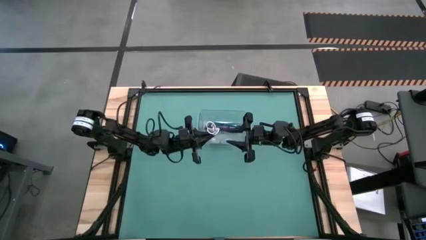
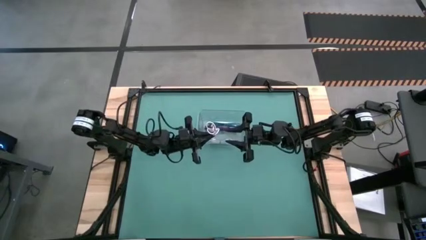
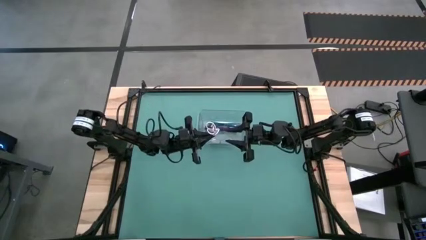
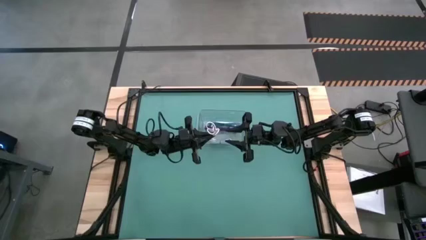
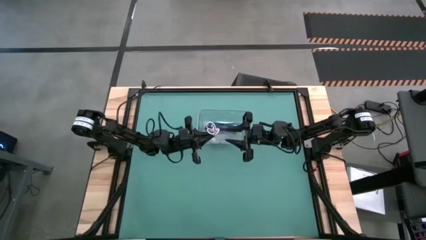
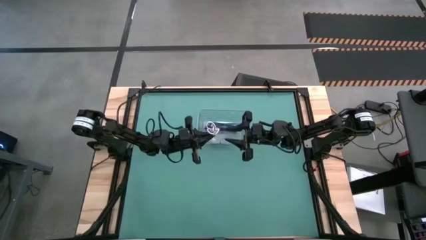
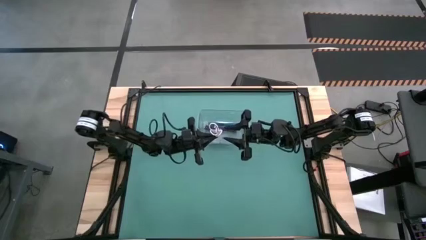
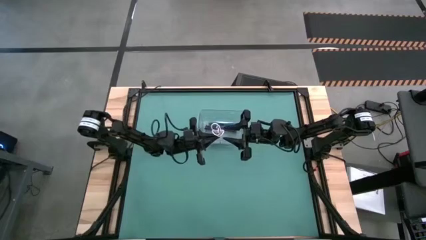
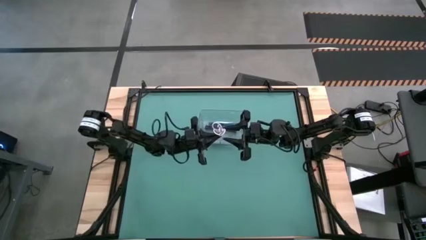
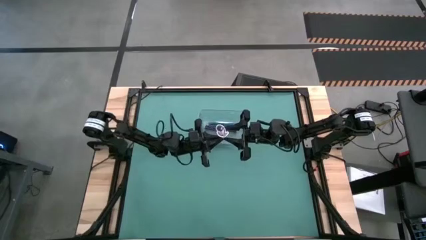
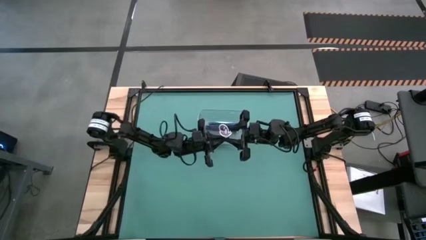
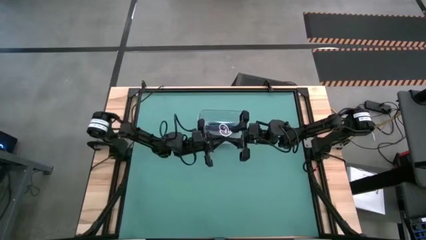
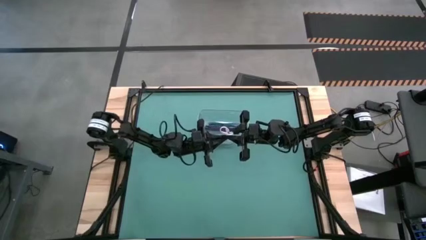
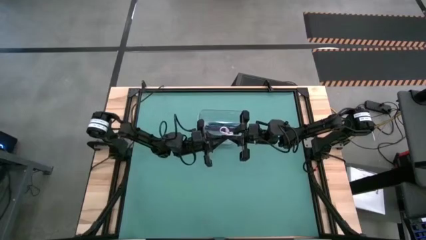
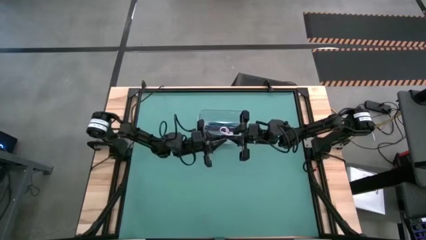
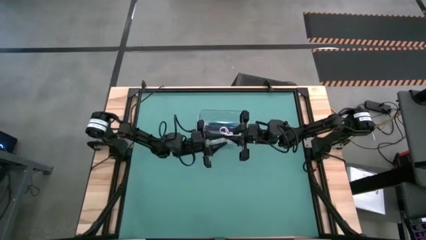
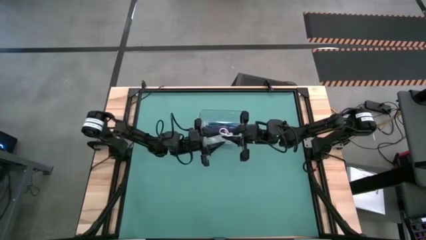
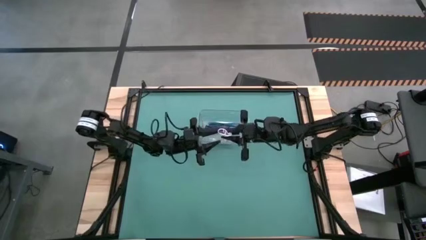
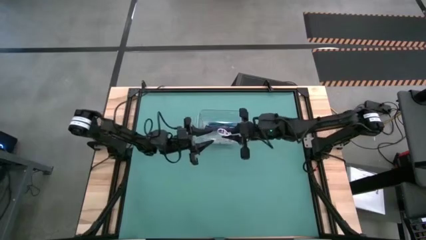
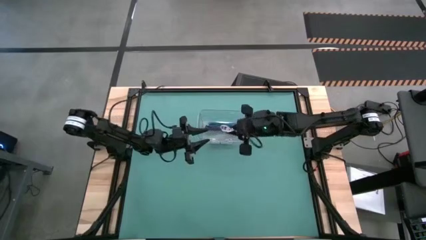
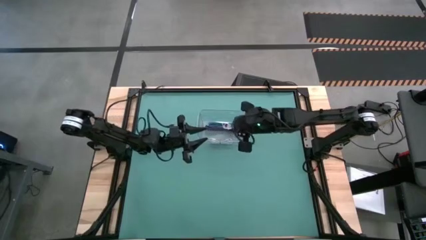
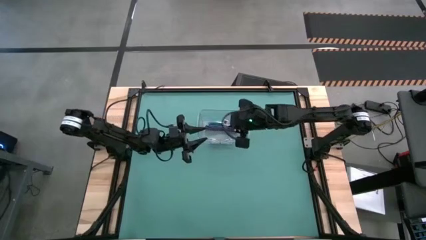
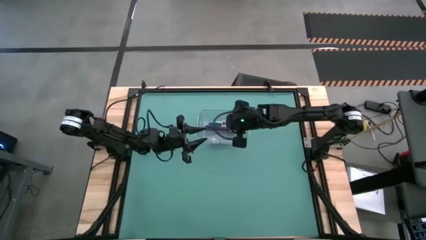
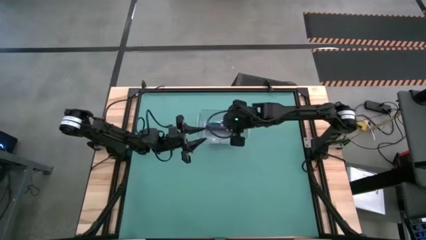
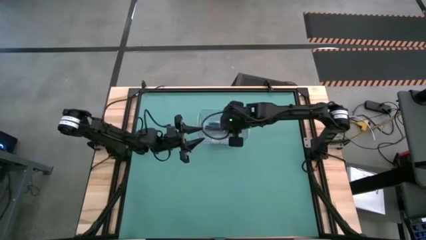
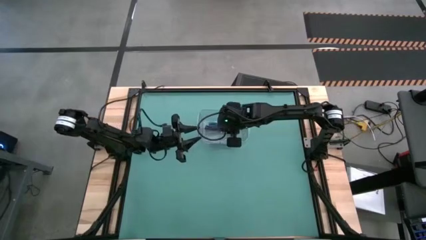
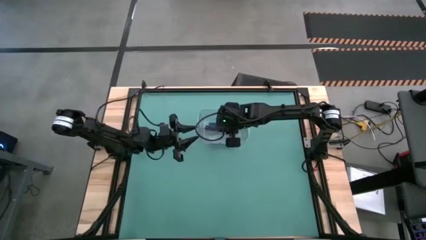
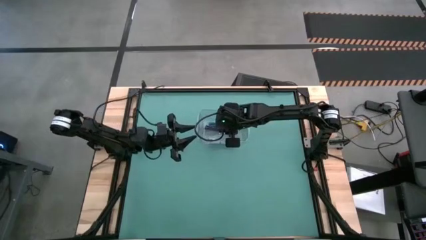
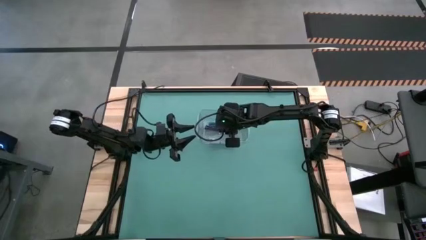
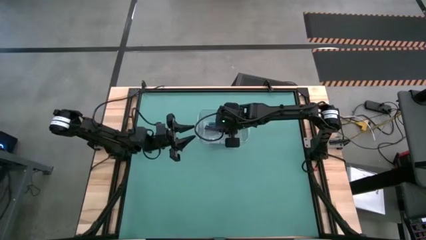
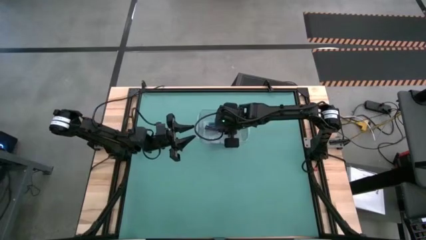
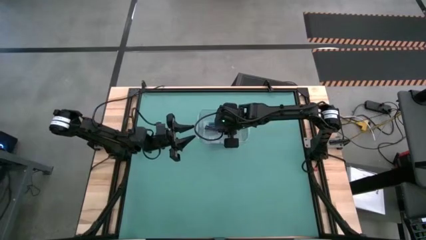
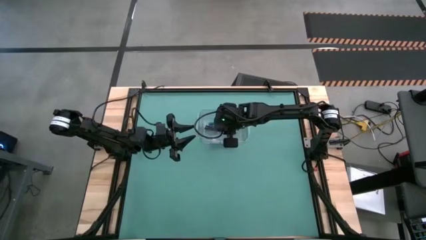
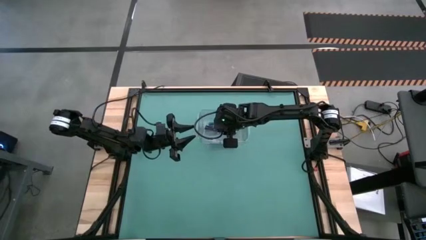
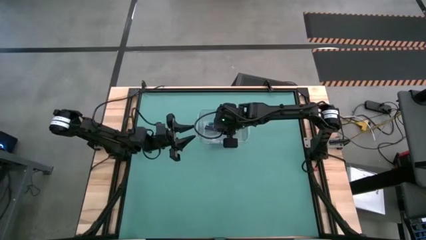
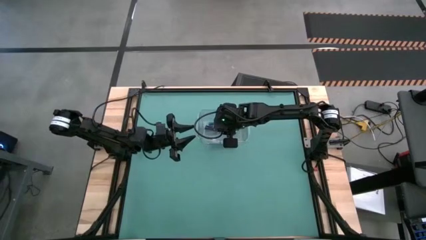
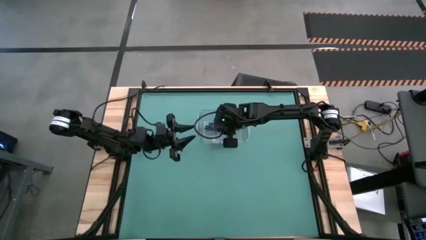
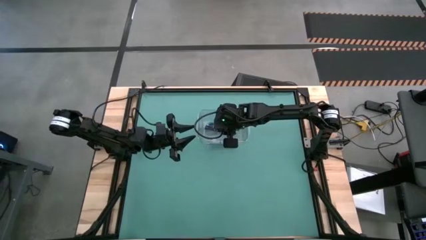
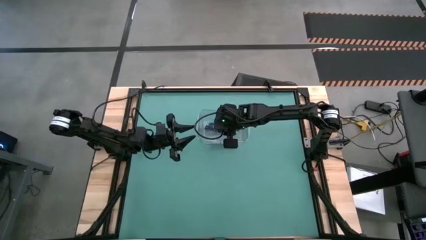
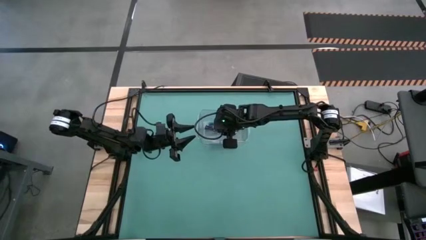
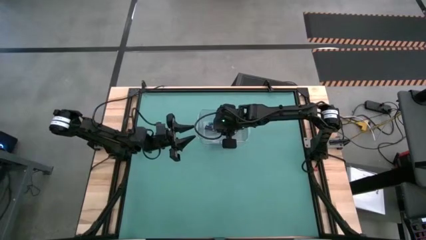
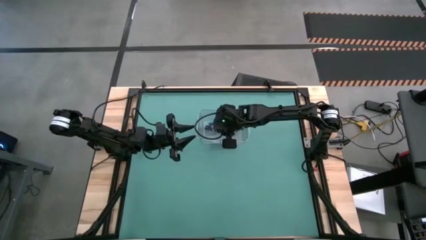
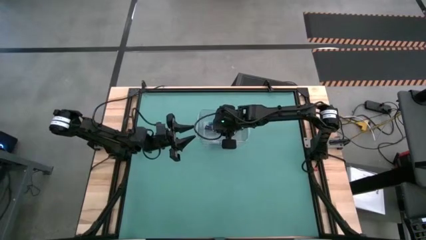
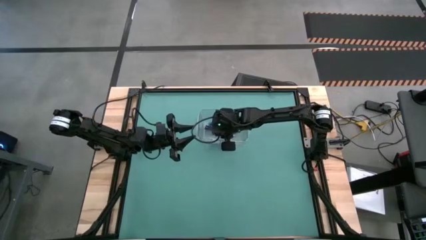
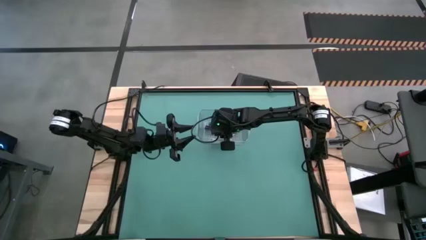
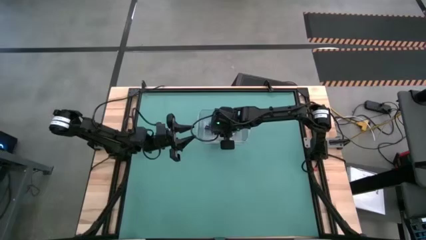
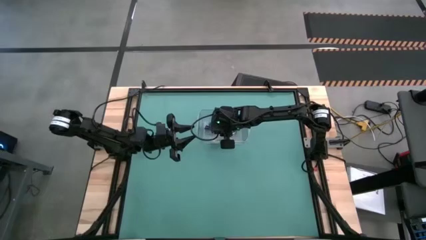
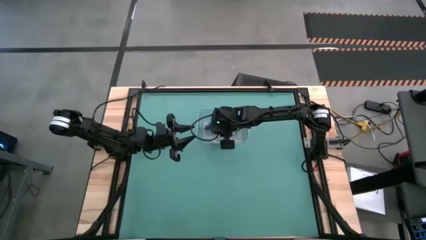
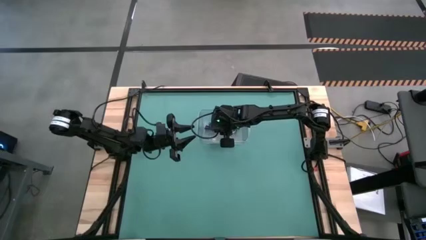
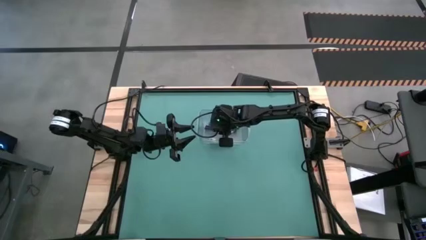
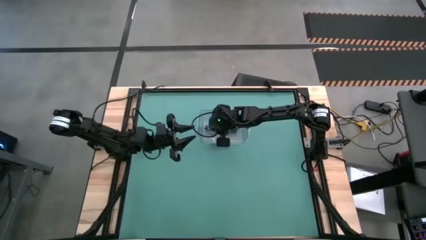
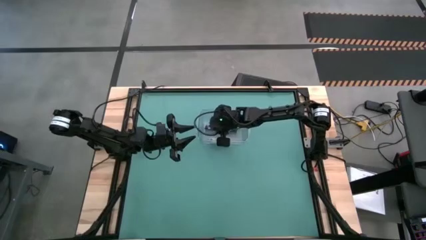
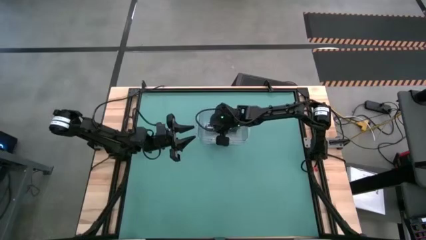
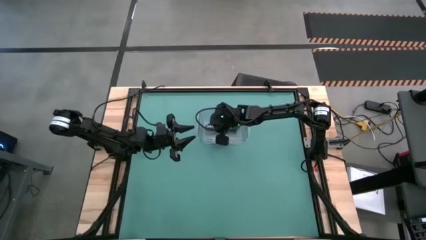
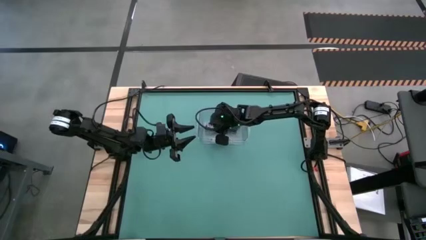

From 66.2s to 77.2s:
Task: Pick and place USB-C Cables
Put the white charger cable into the transparent container

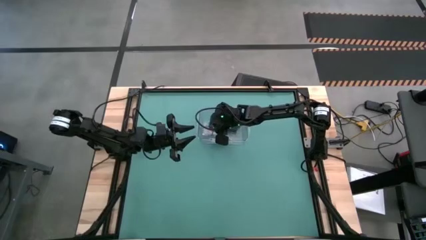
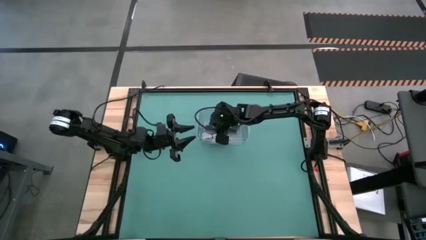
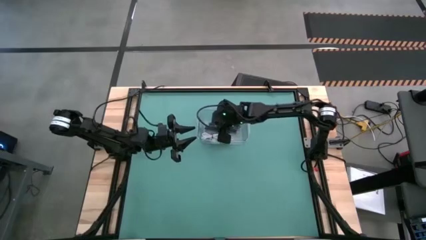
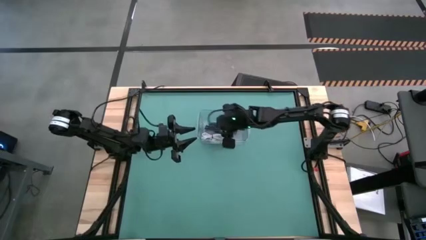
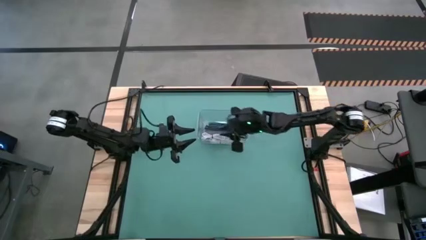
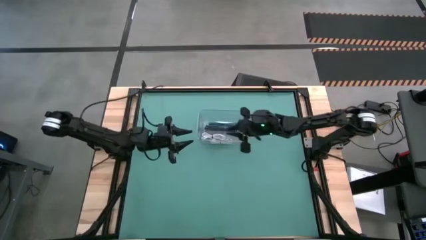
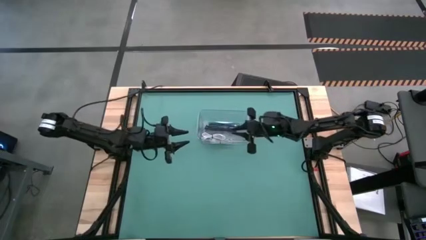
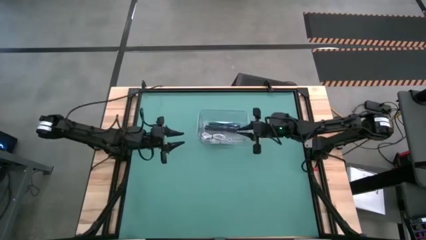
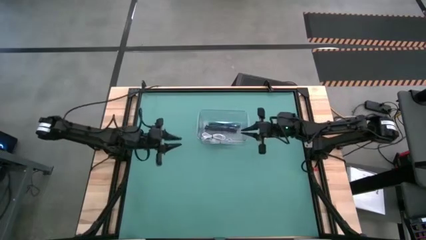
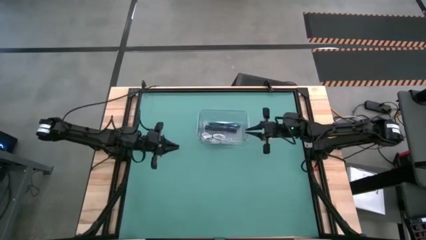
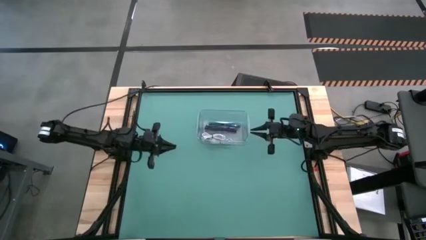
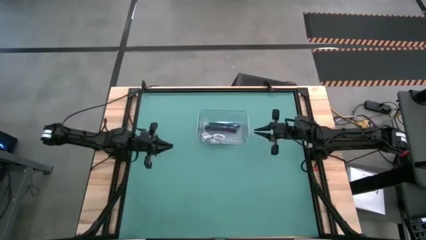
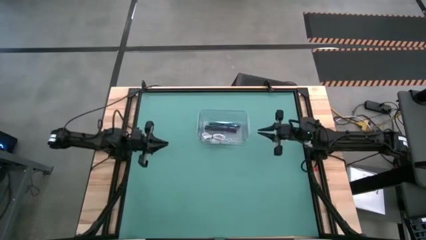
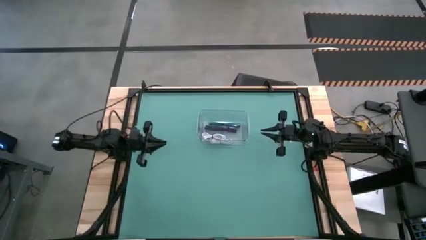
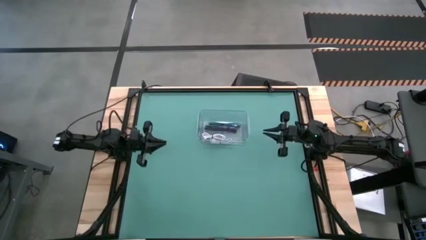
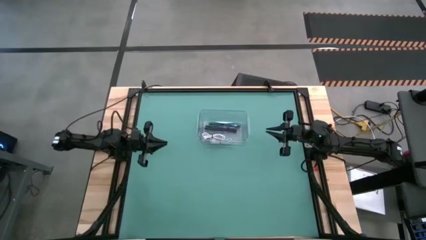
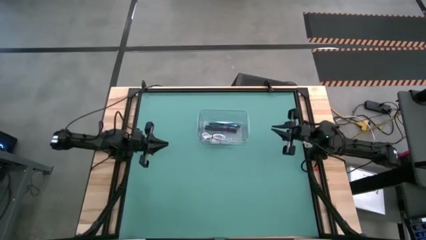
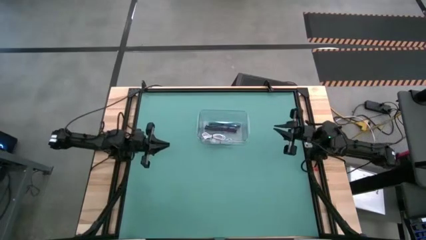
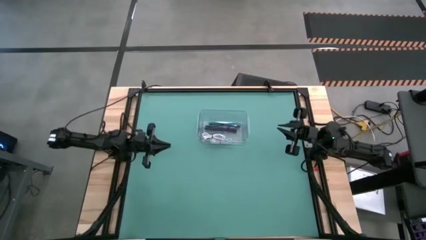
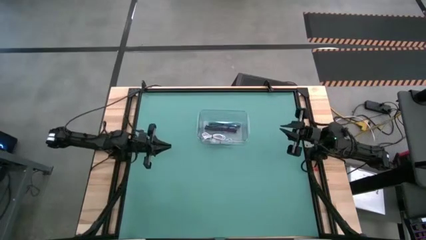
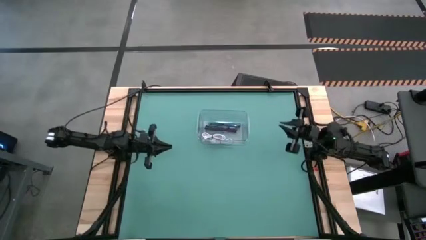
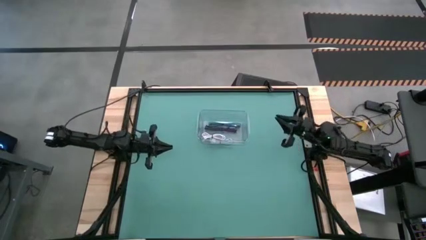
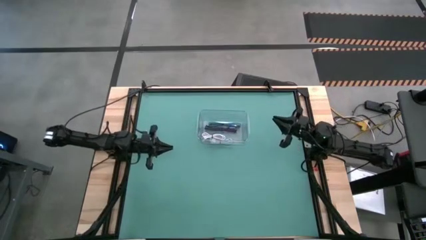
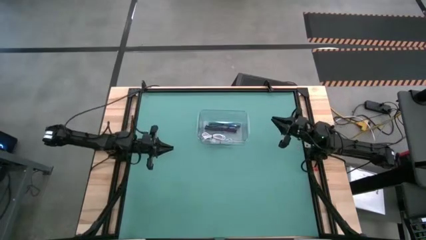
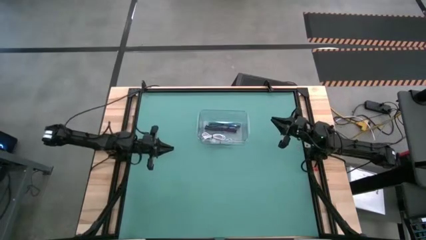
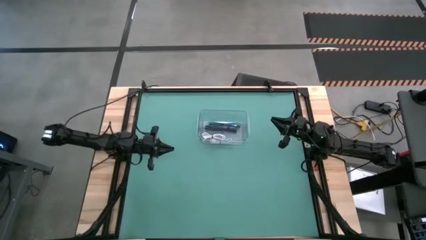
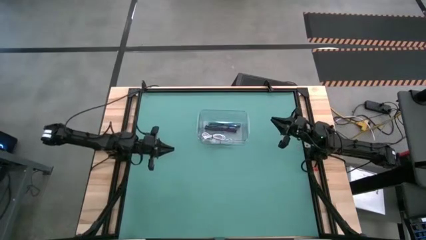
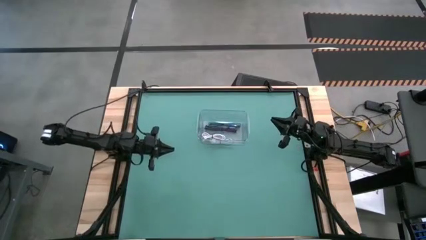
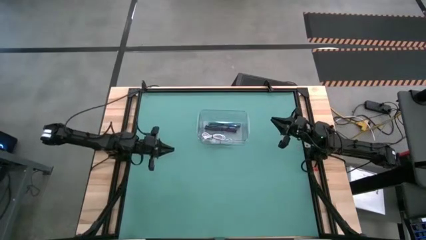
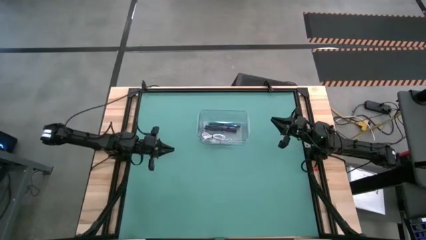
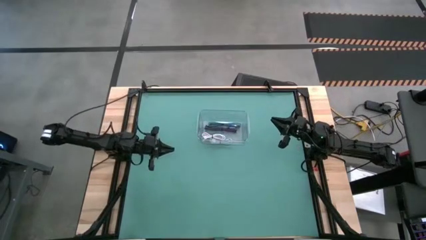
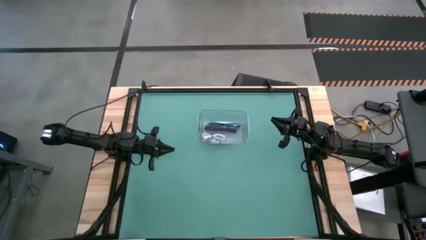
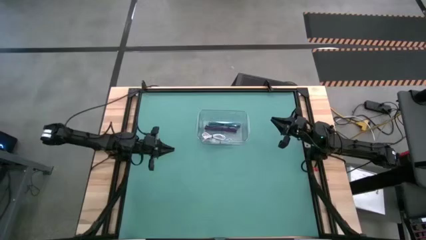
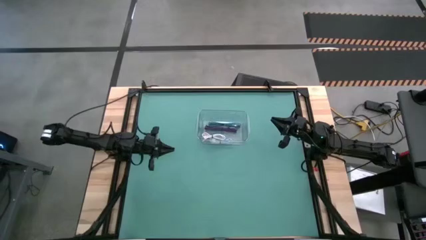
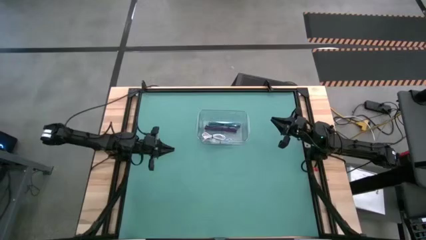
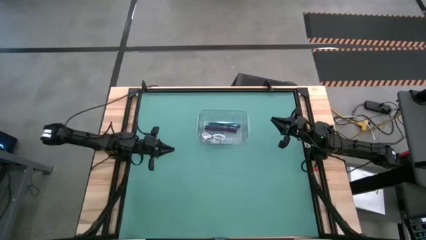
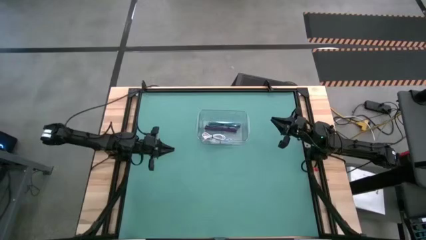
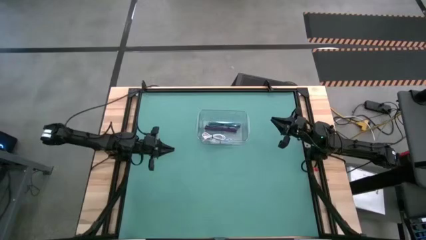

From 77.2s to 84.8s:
Return to Home Position
